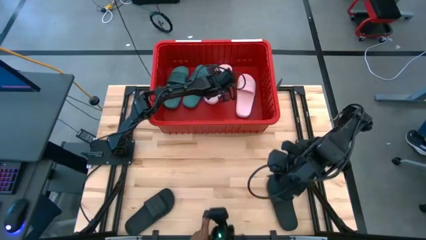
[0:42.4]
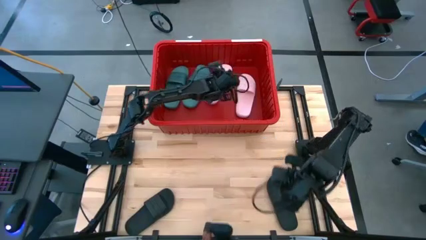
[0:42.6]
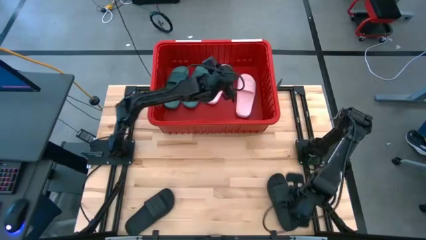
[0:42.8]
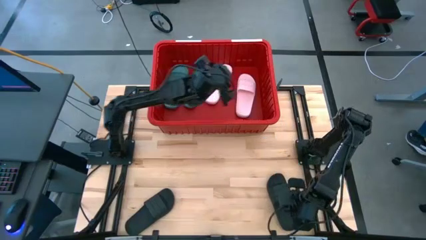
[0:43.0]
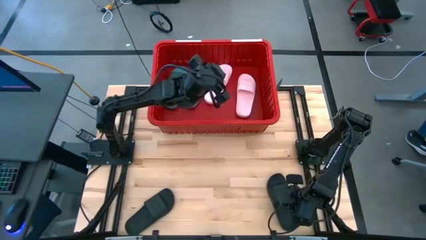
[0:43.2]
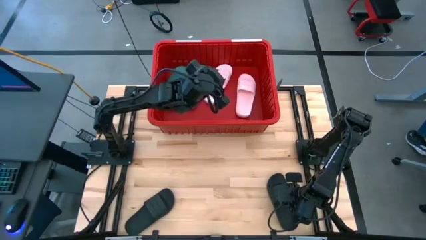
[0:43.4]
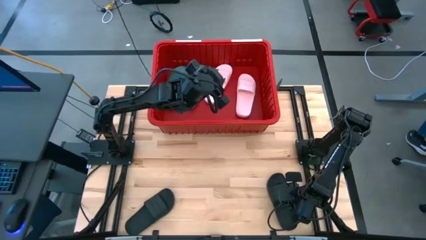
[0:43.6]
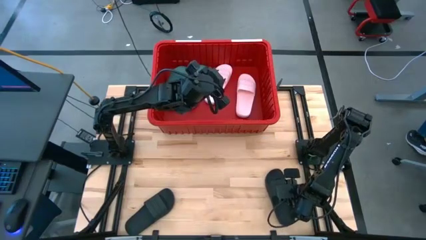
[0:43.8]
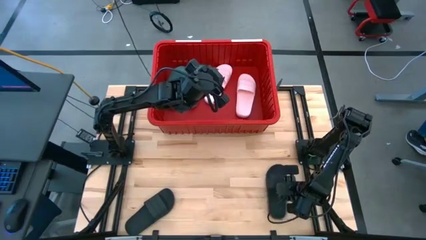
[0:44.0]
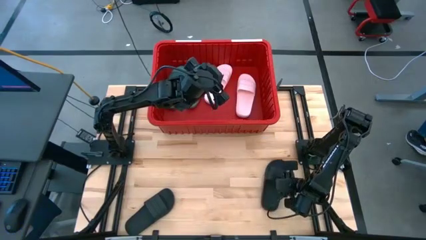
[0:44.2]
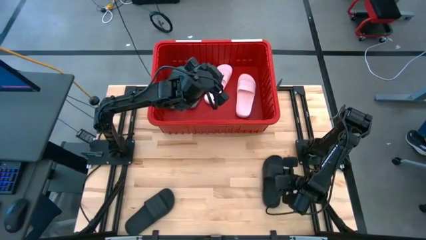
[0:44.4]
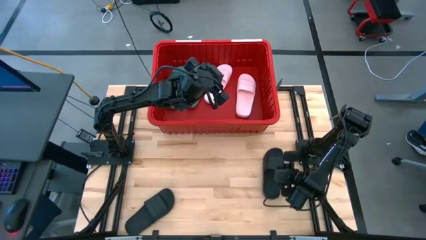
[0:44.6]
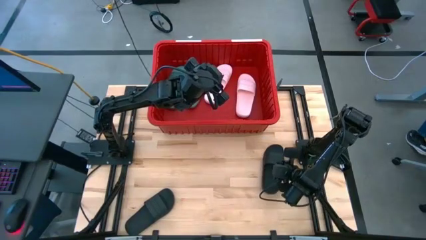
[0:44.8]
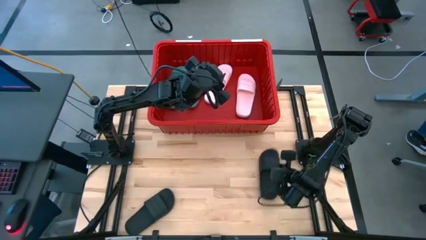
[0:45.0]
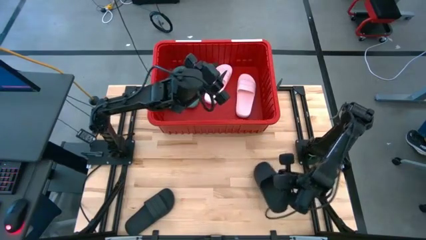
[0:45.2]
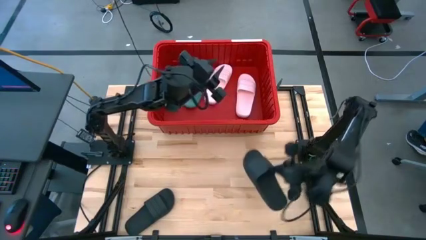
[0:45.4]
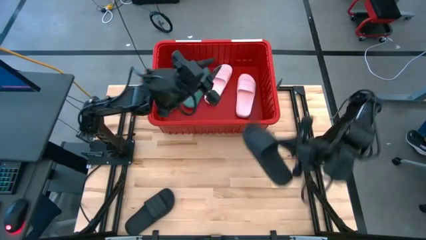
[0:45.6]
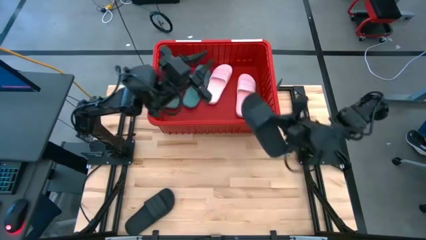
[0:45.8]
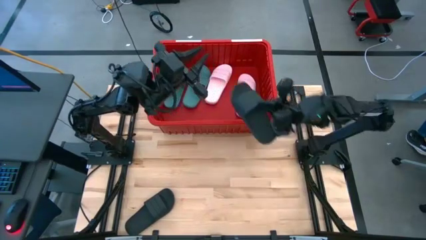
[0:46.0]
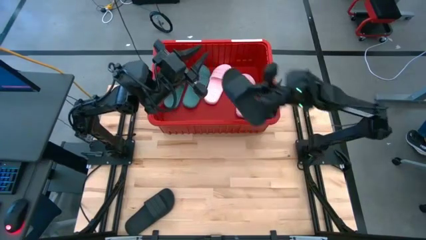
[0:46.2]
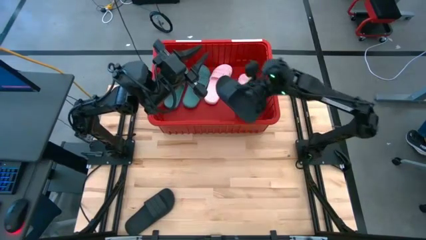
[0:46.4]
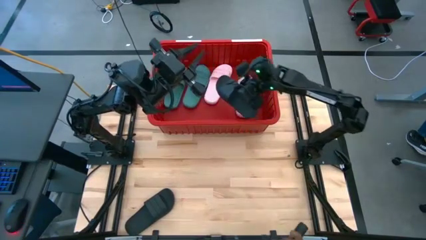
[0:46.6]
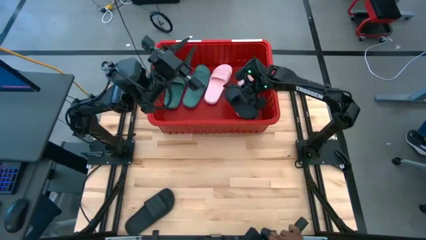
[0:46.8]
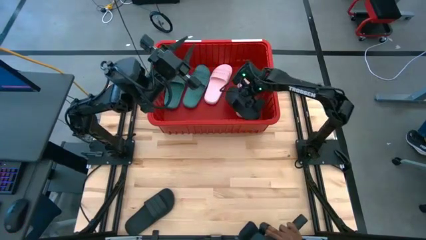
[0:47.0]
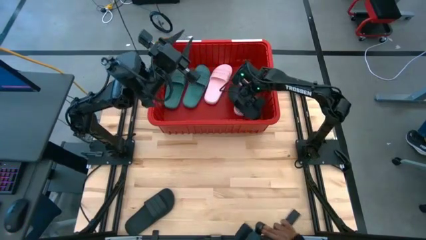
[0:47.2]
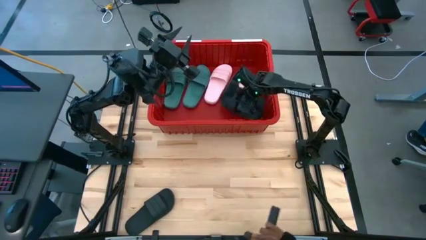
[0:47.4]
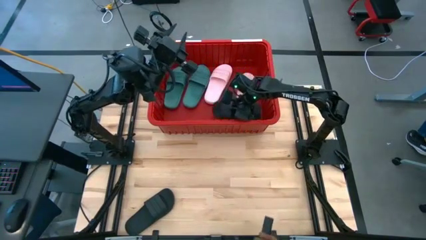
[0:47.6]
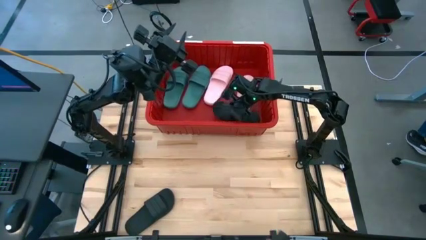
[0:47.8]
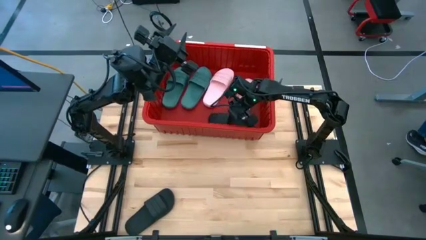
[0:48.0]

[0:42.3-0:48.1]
Task: Pick and place slides into bin
Put the right black slipper into the red bin

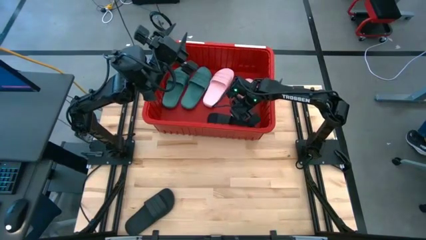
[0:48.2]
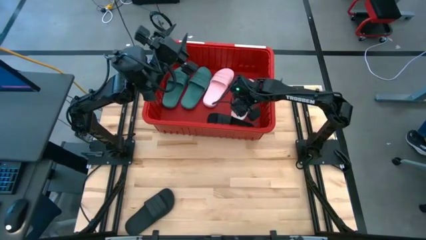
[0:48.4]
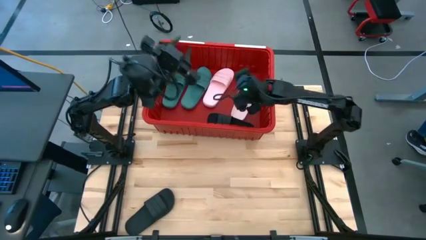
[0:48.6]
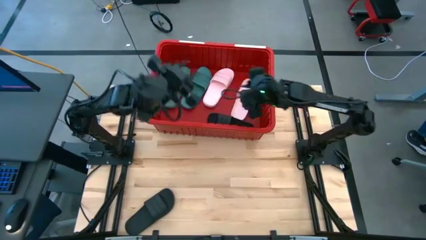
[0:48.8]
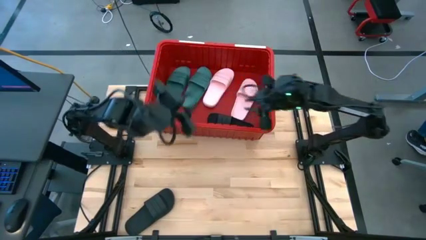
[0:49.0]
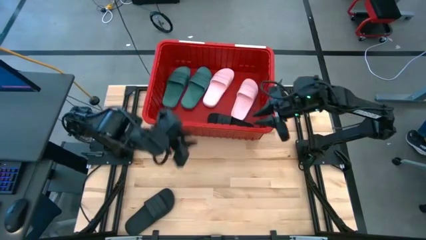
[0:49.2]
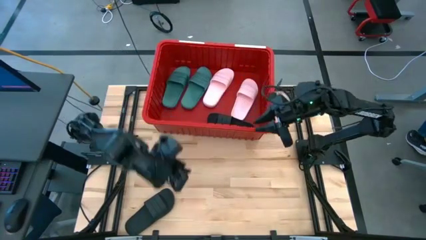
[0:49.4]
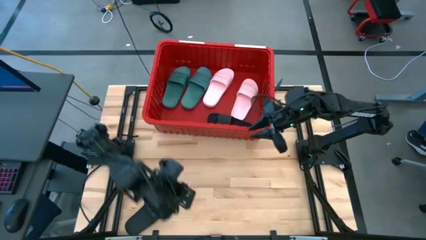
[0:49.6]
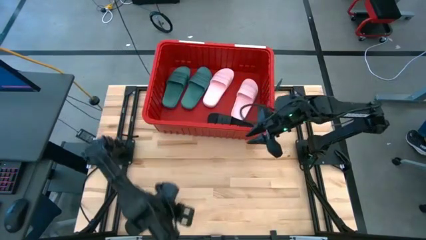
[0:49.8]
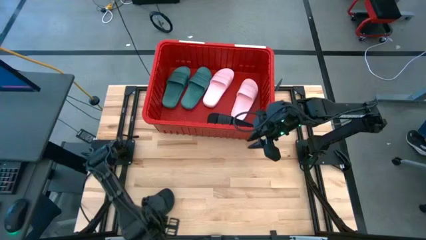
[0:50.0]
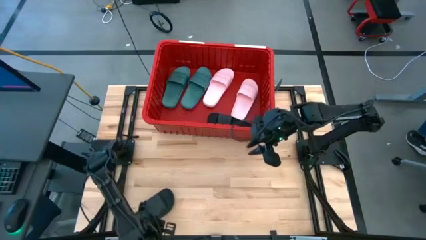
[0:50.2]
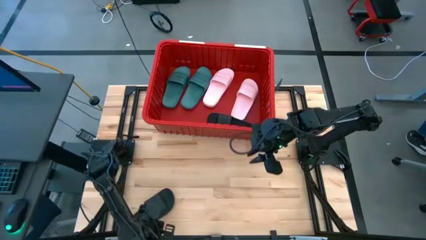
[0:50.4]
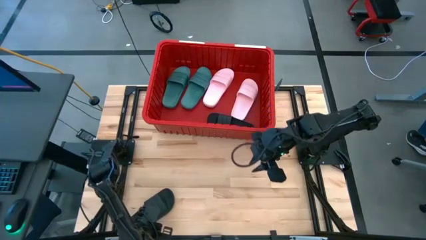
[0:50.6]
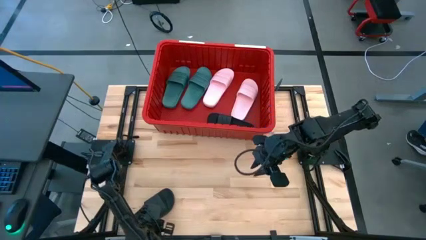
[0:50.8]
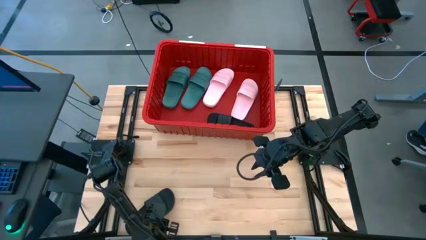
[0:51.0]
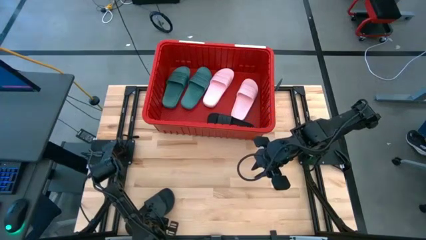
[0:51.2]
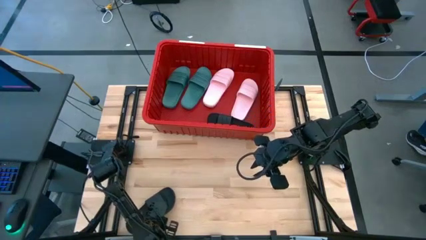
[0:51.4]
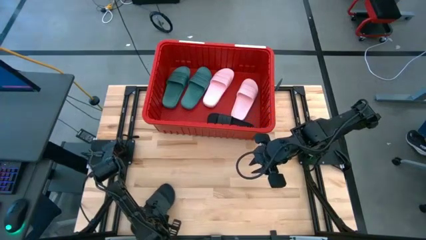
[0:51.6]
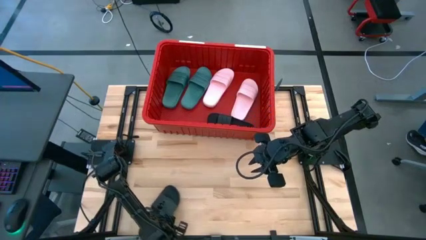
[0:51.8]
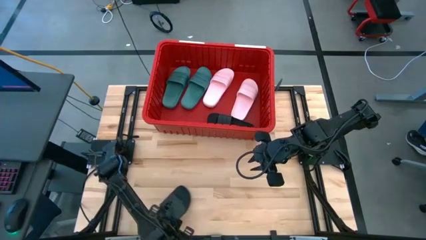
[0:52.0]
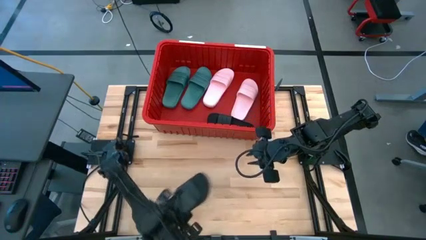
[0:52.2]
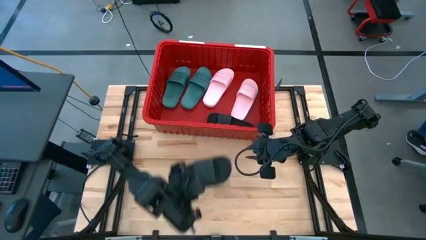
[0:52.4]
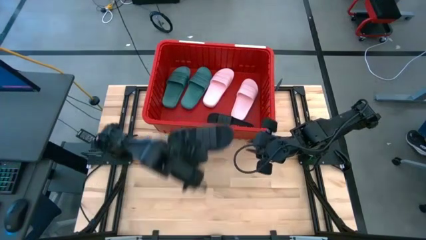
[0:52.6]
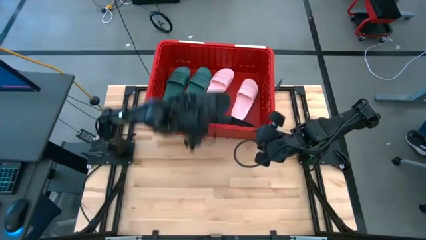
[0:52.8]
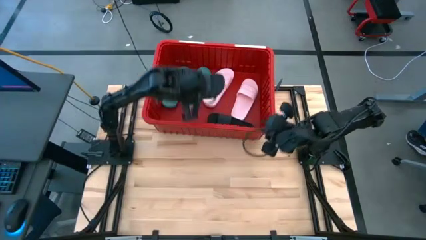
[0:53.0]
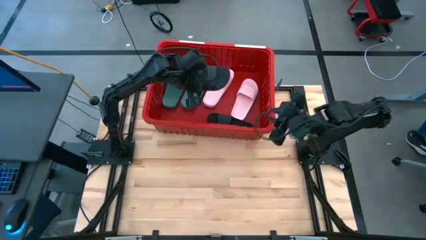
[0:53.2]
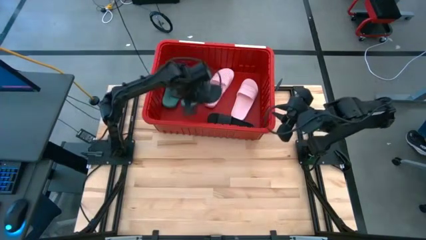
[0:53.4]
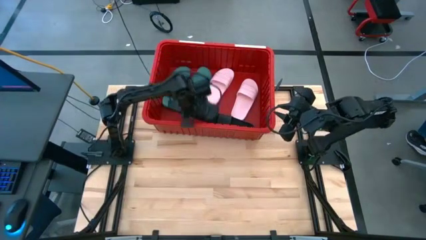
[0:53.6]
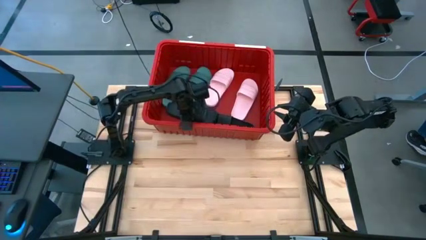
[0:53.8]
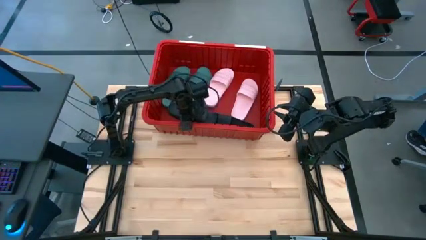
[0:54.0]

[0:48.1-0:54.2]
Put the black slipper into the red bin

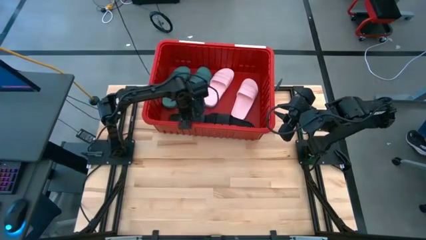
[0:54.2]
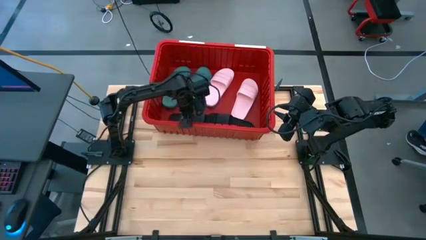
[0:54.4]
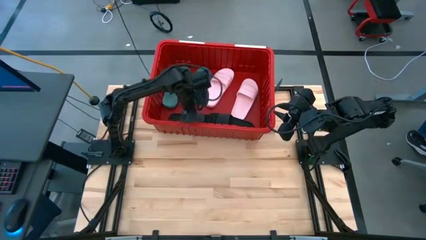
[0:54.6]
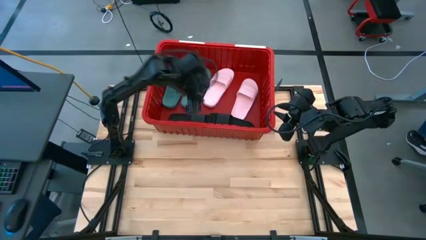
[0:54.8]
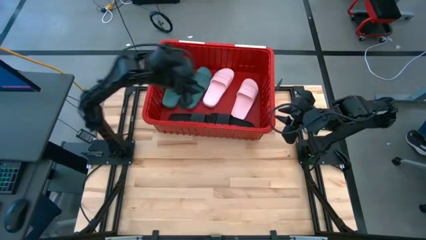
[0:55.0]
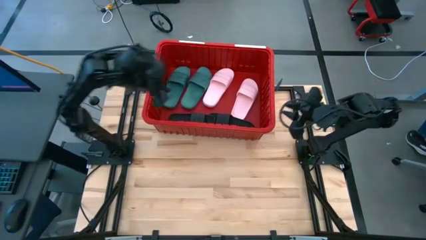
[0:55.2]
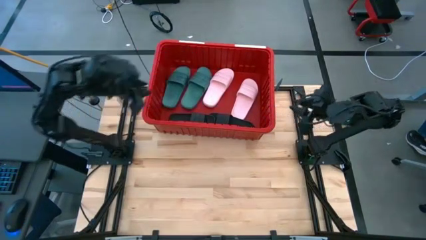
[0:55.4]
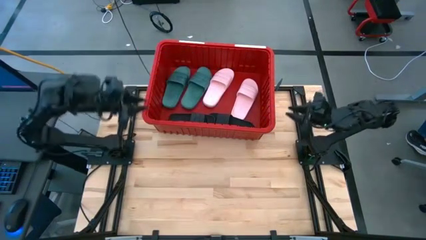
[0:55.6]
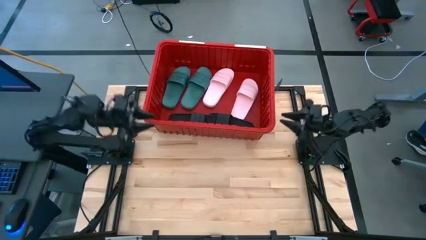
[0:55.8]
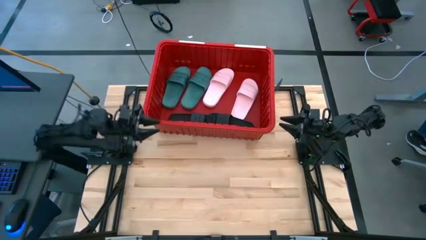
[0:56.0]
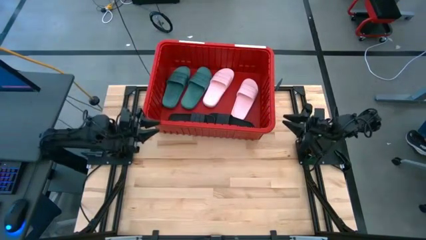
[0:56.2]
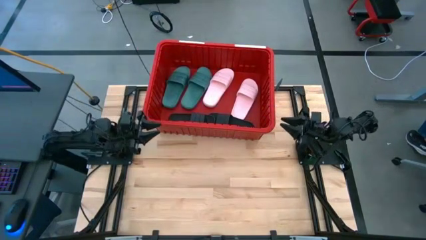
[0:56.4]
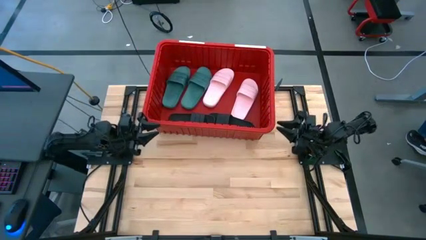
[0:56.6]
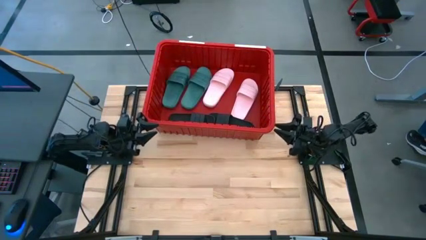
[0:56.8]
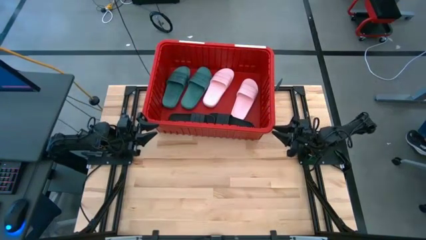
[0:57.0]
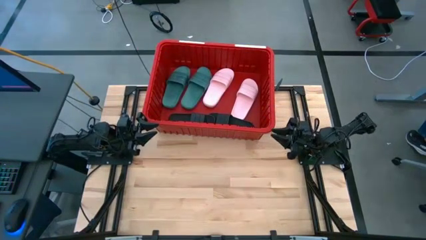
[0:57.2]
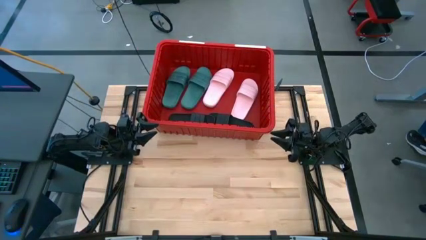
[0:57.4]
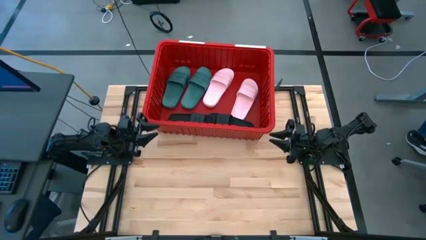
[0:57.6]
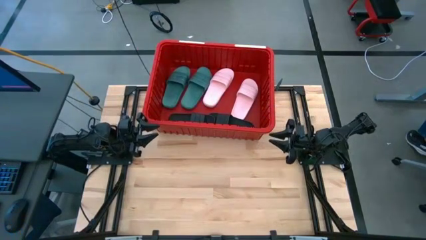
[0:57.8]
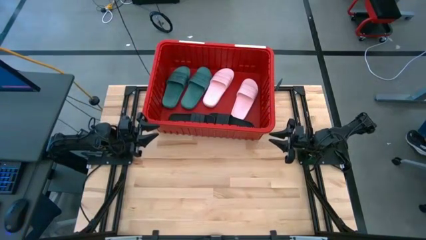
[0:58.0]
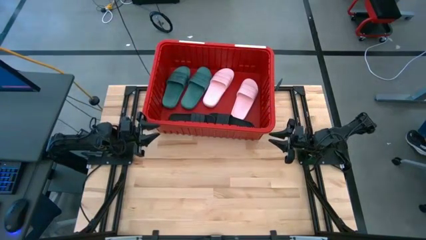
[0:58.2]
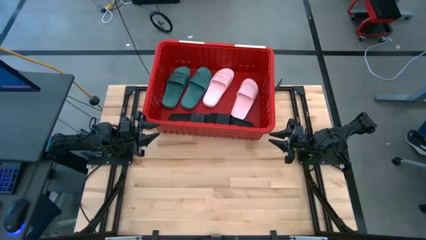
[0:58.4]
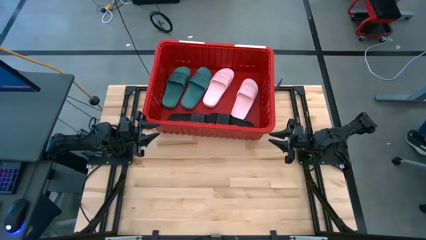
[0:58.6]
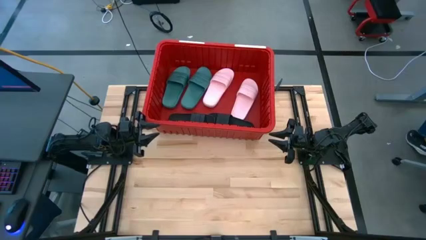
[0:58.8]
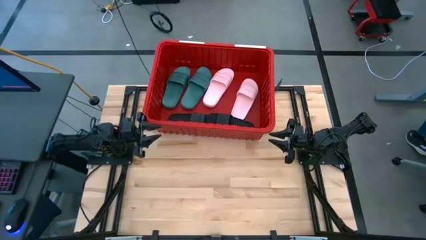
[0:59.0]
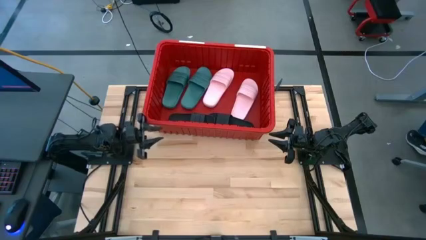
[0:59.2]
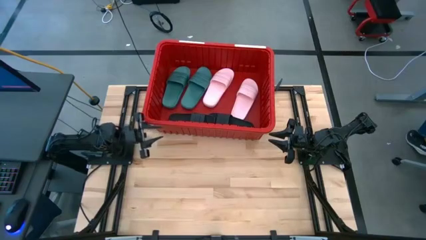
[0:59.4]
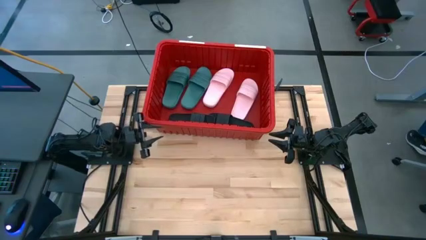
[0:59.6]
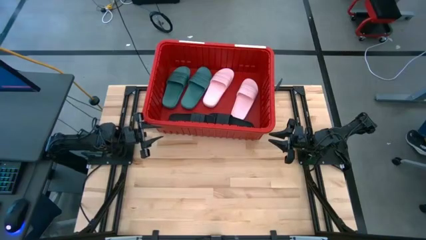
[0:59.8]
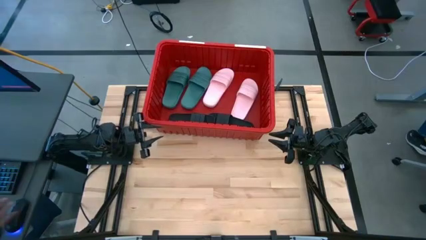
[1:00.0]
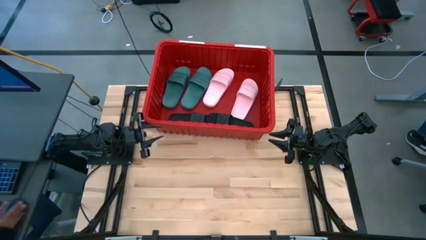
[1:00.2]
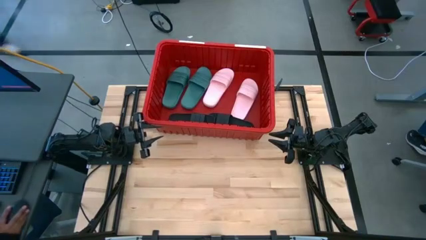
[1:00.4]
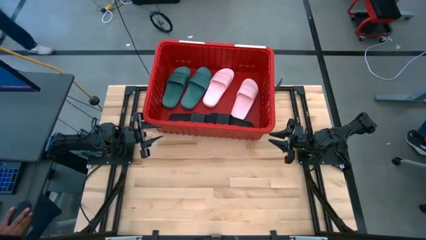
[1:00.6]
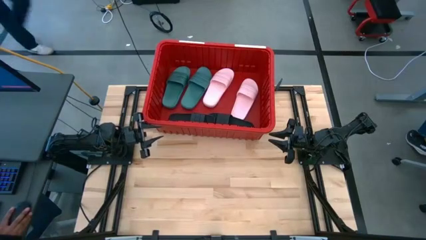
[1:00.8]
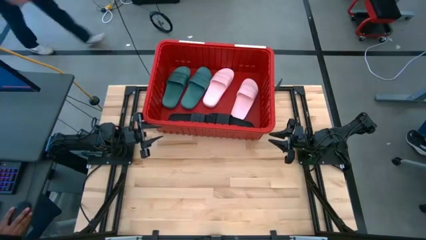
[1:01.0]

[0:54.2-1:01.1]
Return to Home Position
